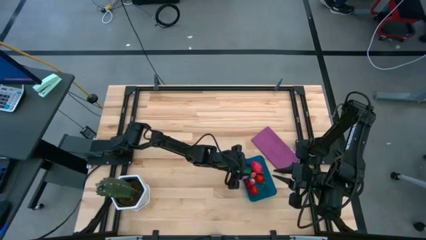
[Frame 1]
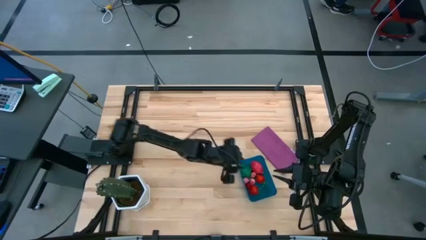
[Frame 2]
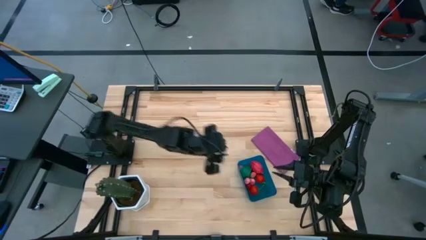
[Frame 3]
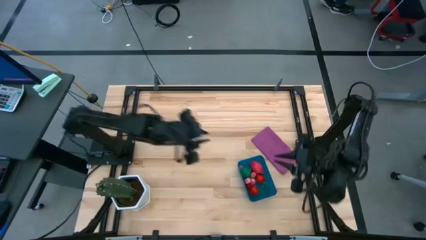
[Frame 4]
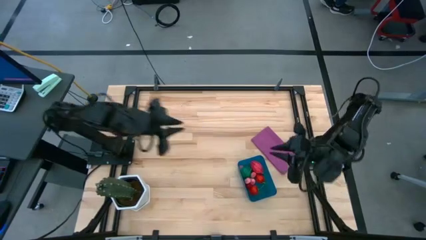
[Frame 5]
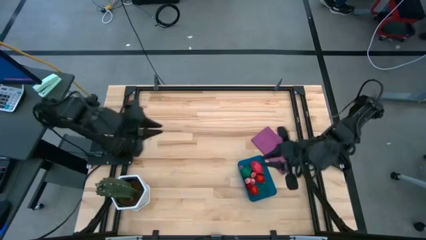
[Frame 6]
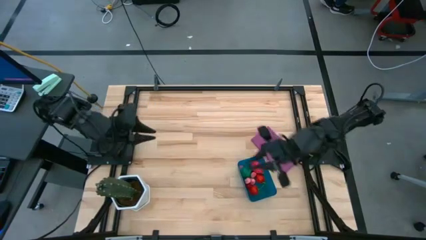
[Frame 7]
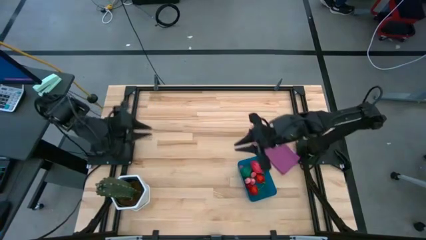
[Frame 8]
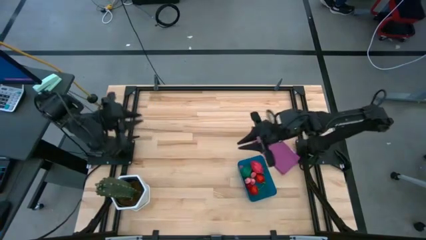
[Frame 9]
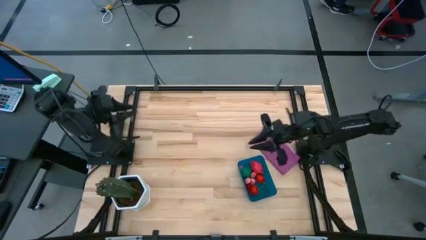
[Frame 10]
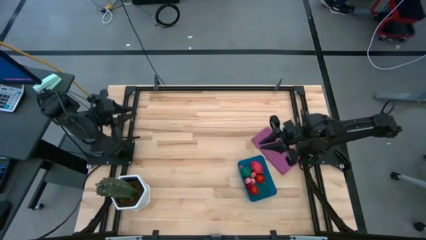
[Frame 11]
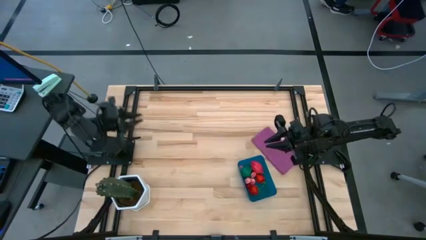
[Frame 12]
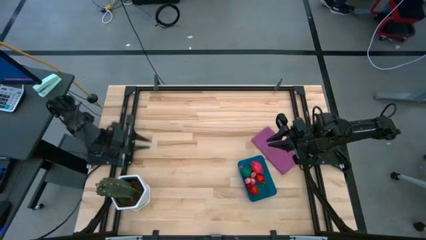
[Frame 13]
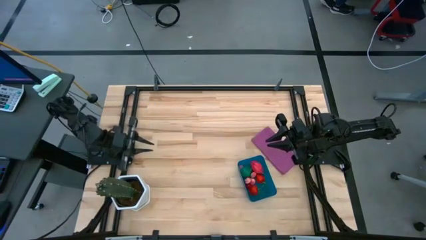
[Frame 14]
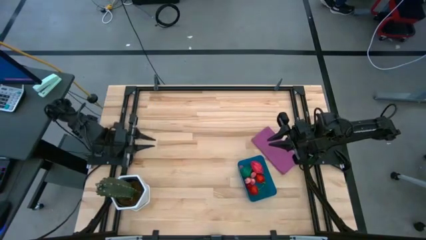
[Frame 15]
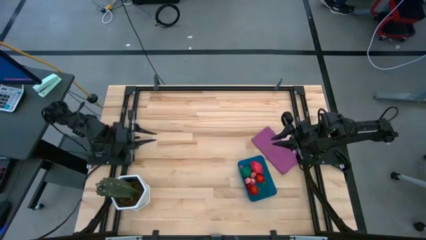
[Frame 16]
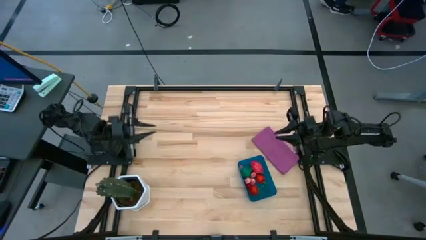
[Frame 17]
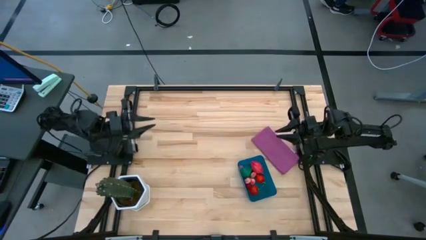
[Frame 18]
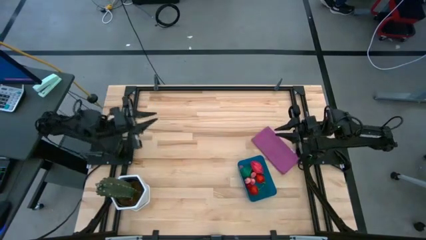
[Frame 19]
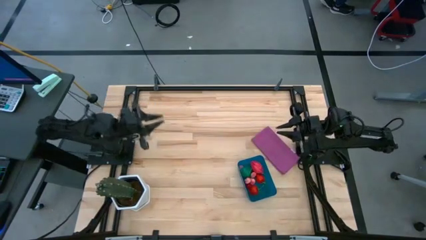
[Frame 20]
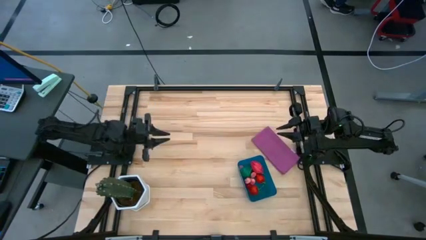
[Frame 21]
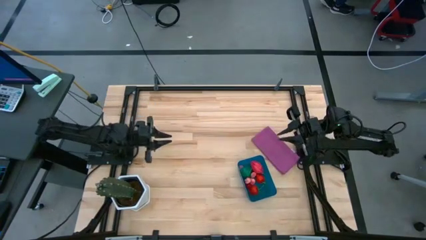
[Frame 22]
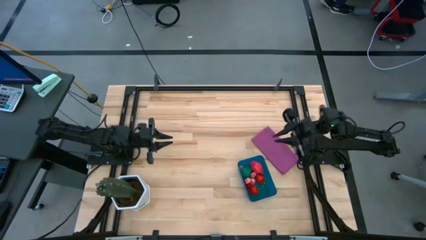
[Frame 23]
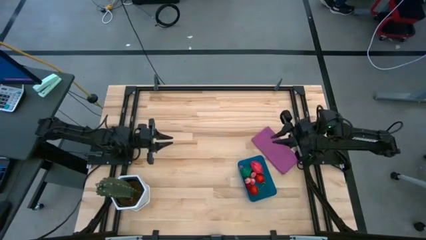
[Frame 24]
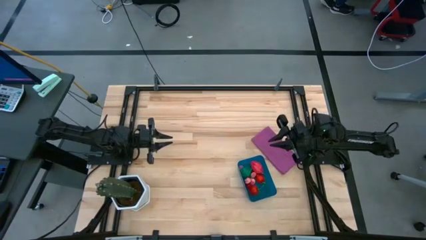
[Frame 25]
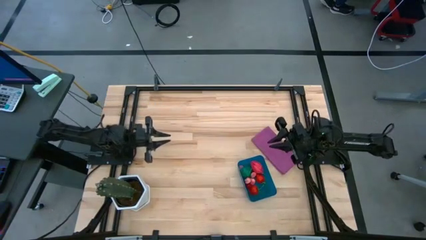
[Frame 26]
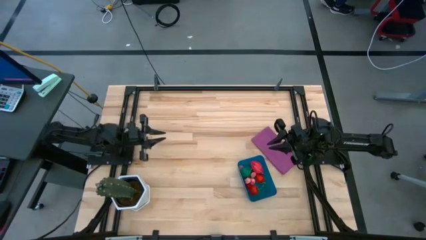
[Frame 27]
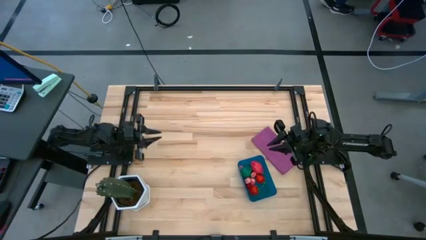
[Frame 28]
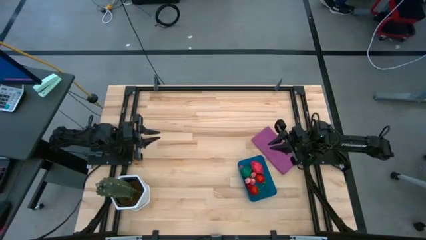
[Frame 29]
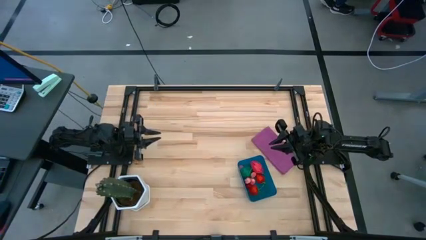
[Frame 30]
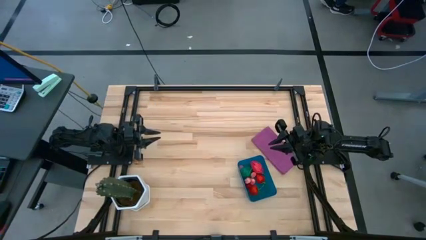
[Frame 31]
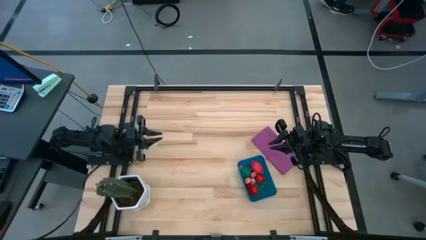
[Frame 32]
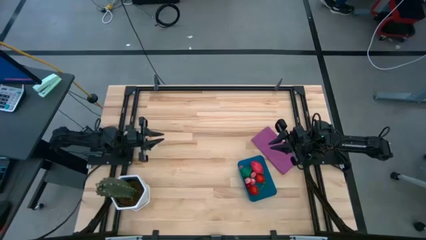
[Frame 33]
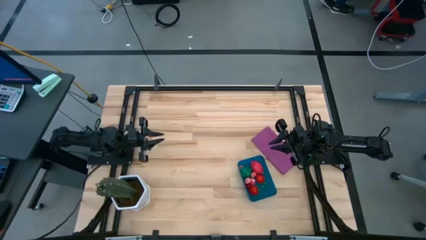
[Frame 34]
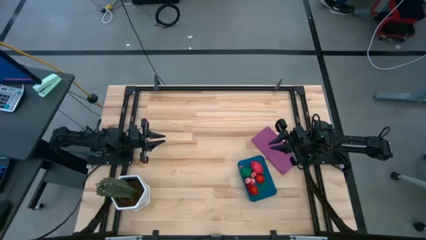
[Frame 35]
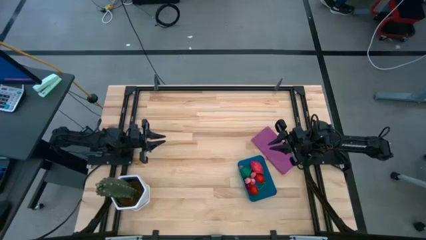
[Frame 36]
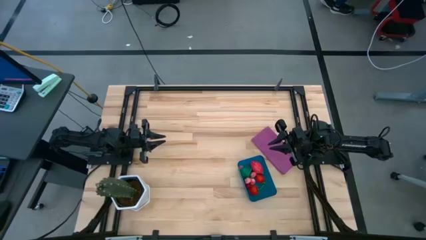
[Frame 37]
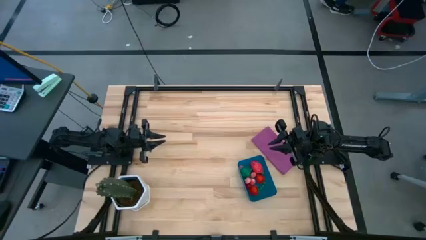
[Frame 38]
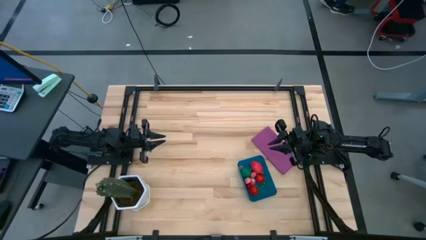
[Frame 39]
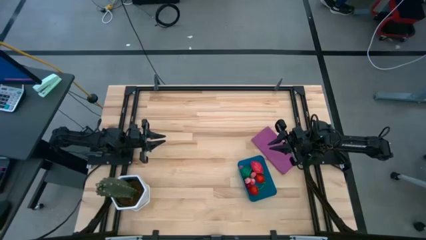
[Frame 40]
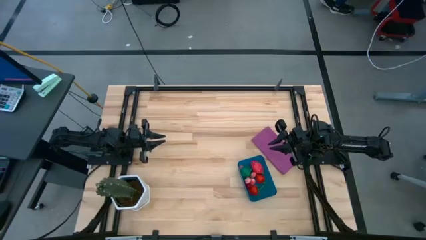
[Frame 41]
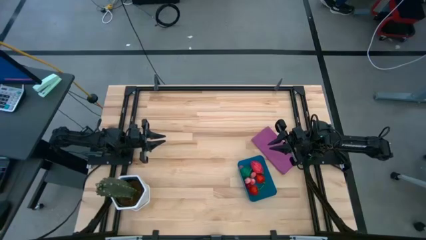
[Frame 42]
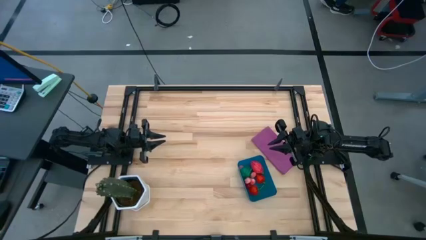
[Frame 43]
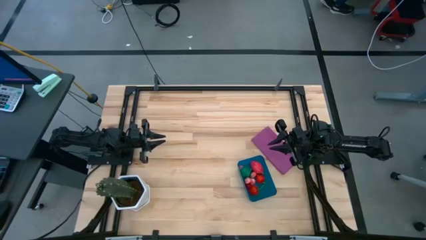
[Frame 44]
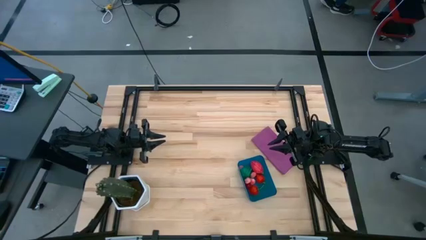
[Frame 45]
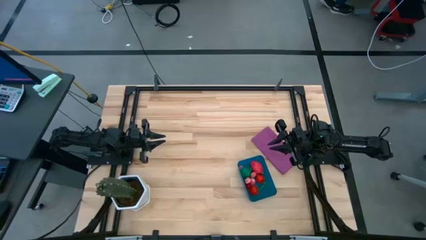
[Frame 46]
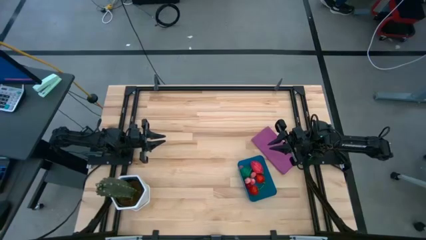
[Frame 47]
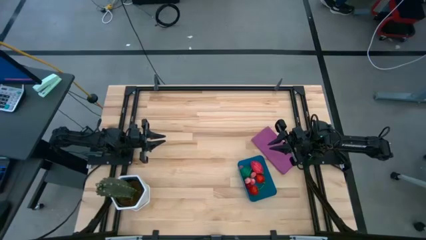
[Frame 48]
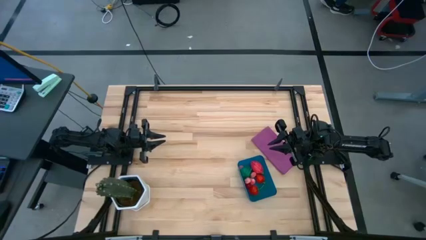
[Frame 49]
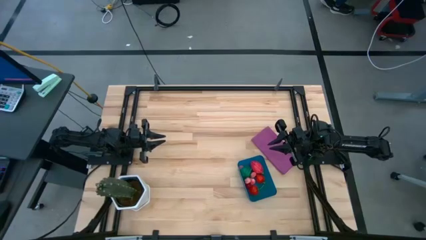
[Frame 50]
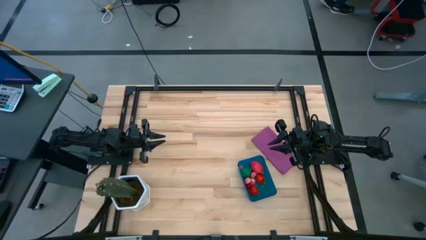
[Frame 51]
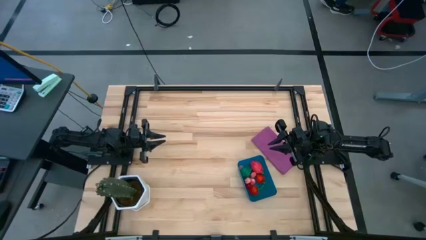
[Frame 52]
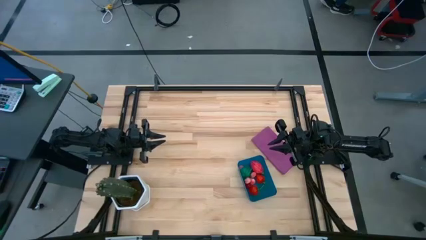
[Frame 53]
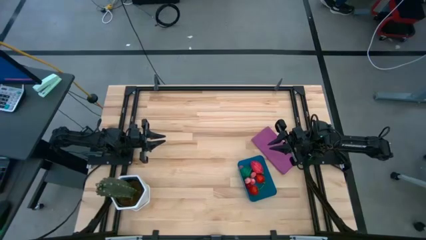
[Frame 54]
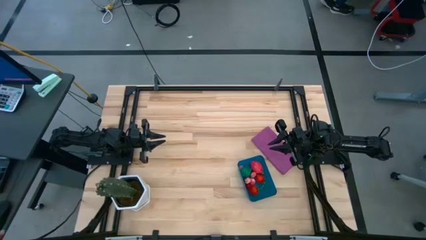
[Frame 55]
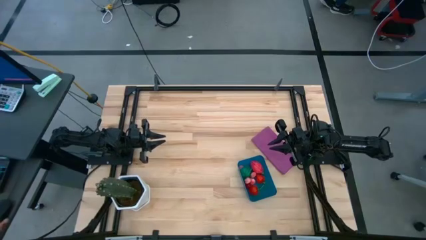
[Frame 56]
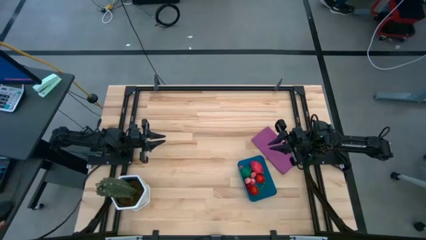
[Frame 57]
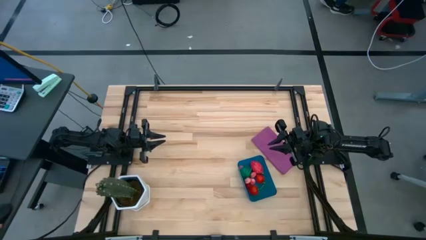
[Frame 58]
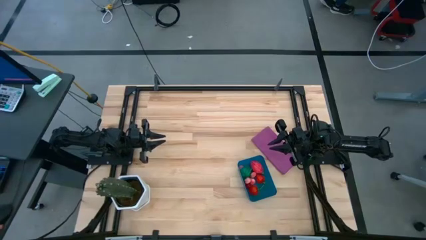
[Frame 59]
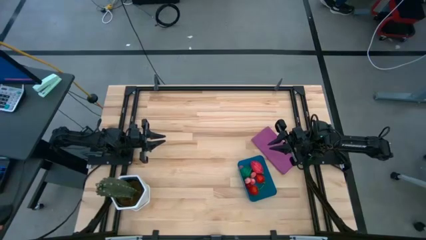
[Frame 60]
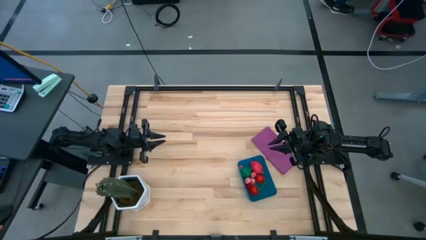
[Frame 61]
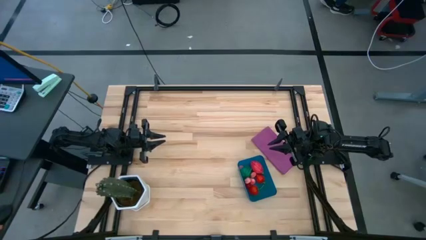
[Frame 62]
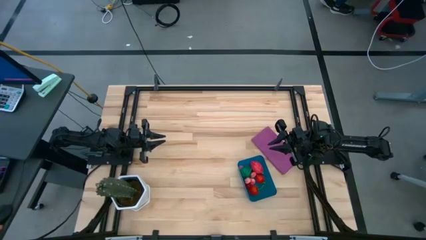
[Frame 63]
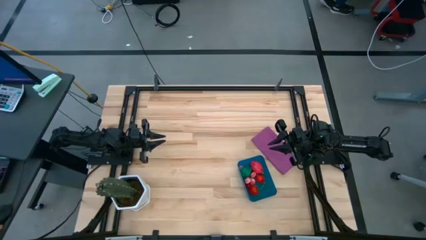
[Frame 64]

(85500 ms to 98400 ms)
Task: Pick and placing Produce into tupperware
Return to Home Position

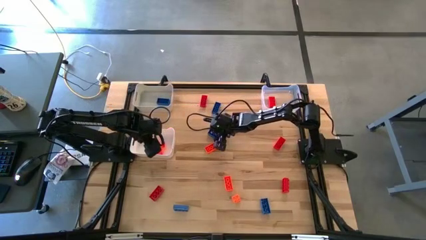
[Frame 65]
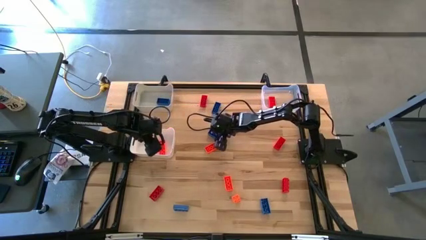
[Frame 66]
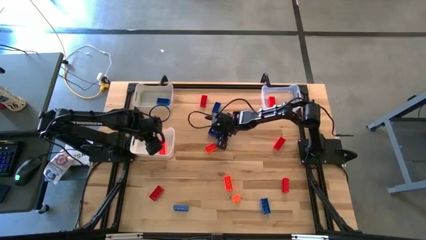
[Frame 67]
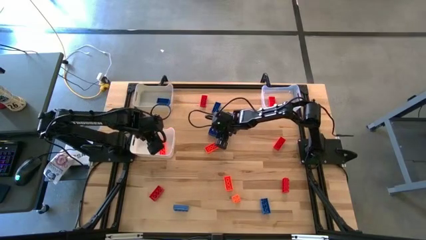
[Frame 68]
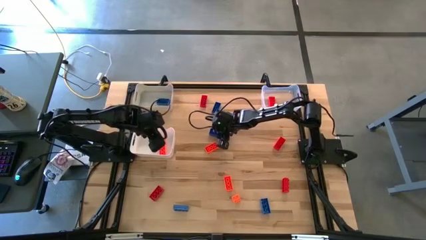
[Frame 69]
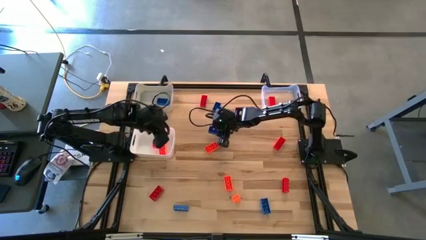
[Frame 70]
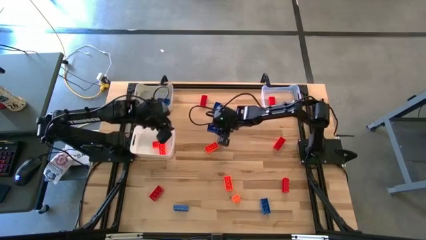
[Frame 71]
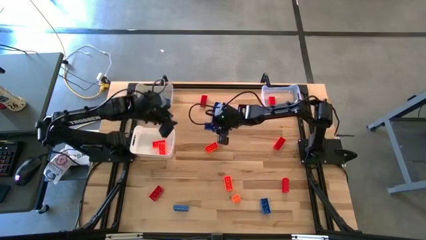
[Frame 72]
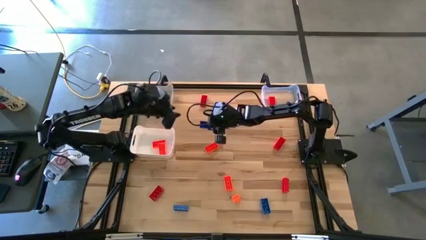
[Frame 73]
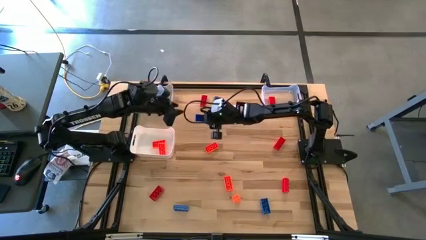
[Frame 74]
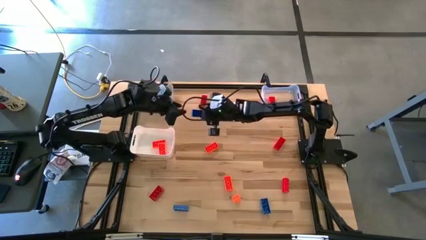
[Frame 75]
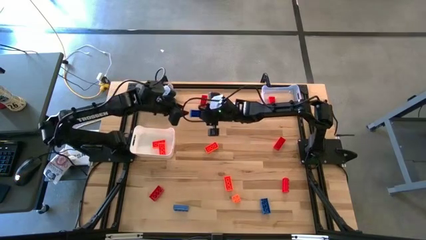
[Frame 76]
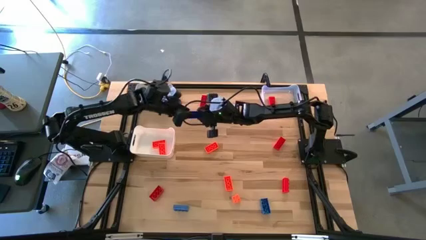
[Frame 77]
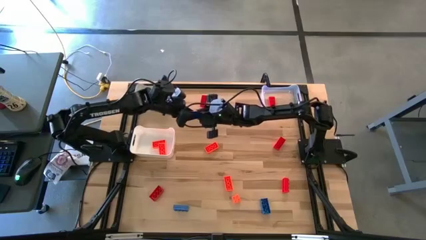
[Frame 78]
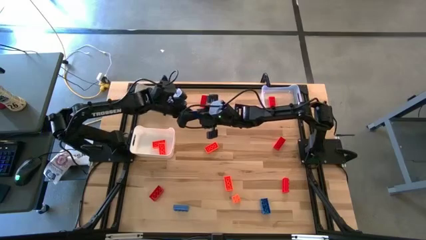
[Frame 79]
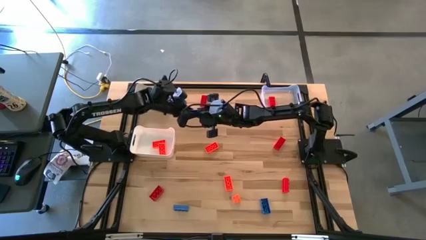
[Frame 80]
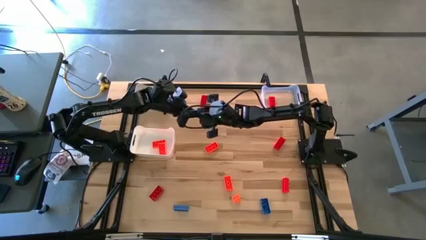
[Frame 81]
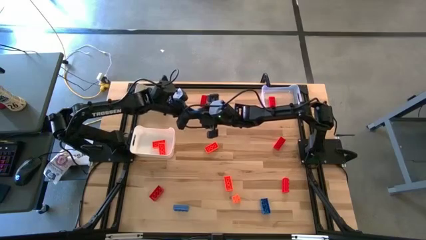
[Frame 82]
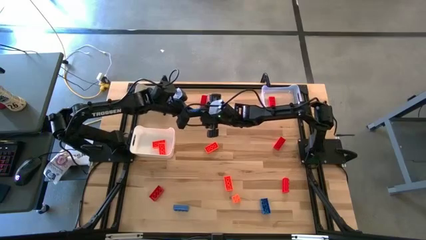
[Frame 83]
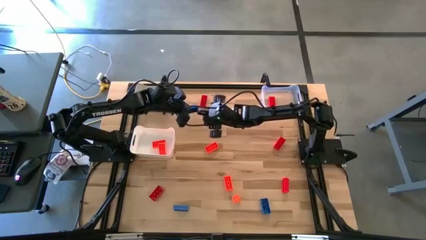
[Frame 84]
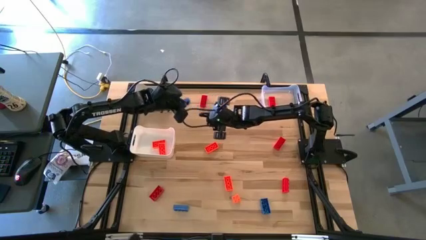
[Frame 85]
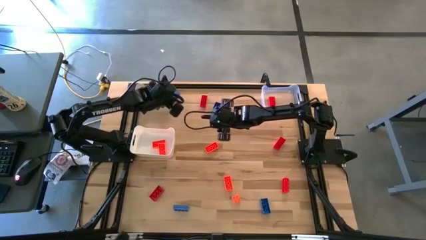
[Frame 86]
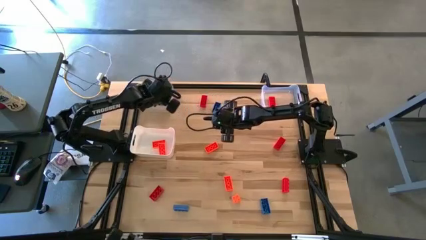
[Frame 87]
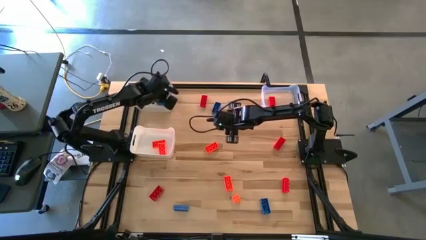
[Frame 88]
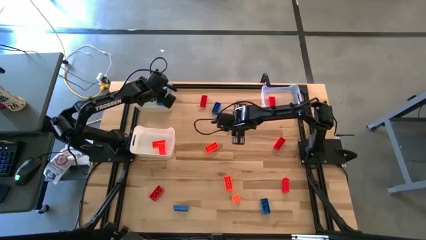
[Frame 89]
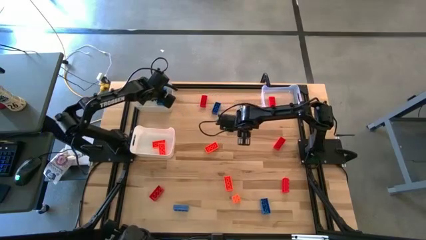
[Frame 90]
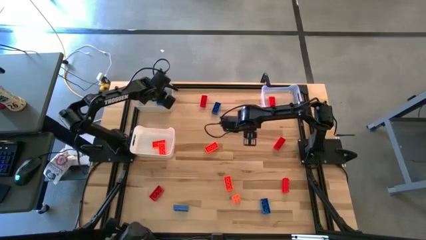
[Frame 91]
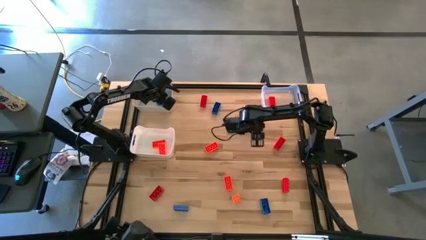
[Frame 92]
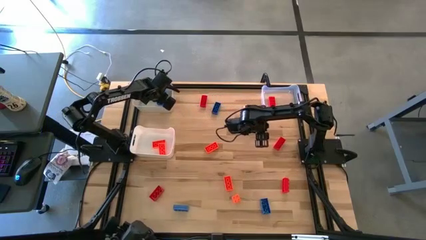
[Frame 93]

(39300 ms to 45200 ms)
Task: Sort & place blocks by color
Put the blue game piece into the gray bin
